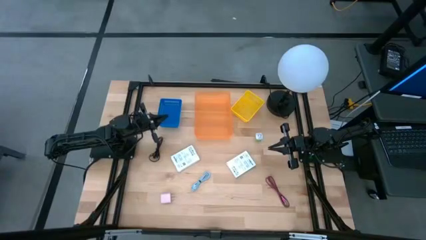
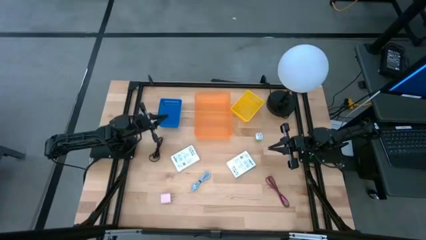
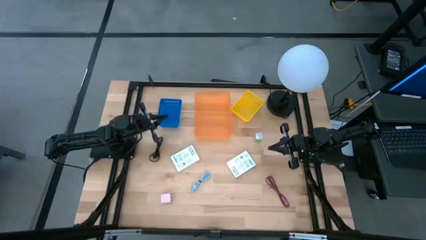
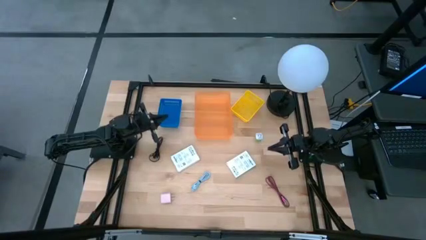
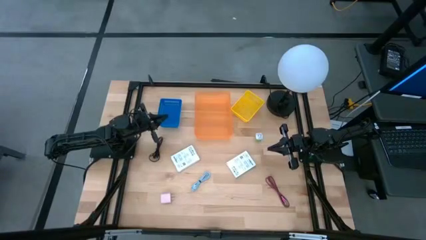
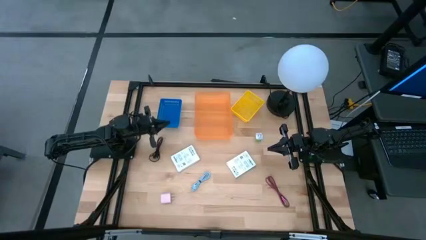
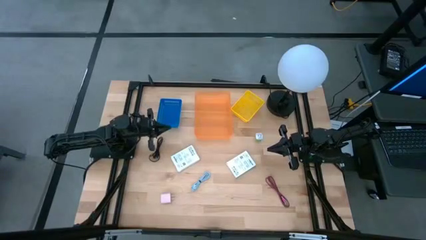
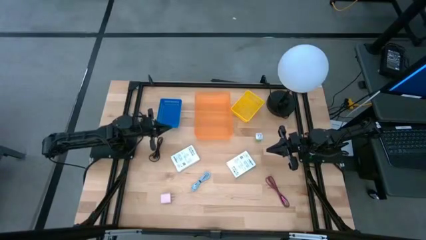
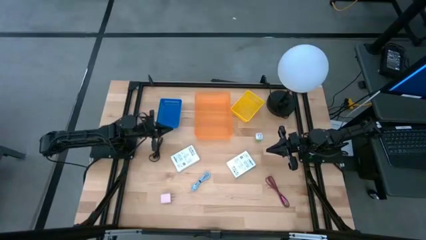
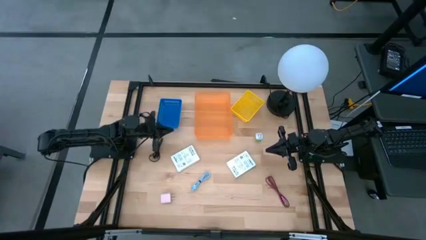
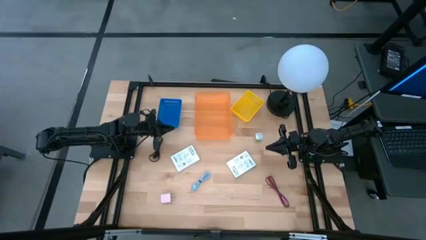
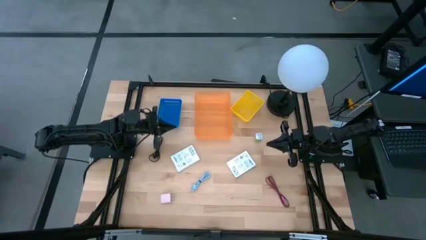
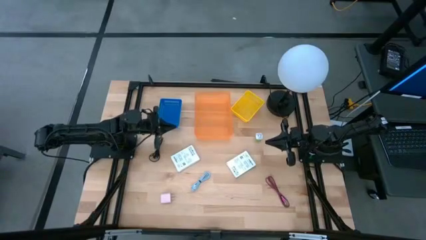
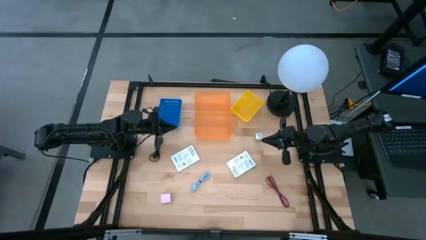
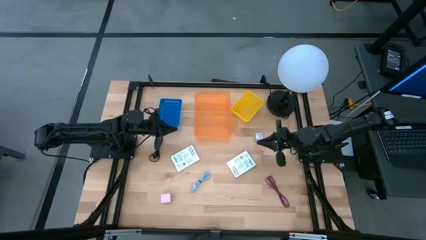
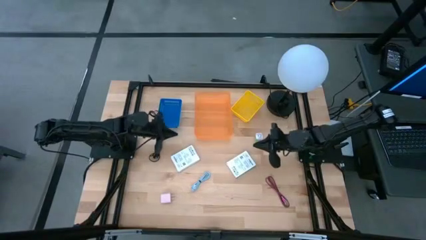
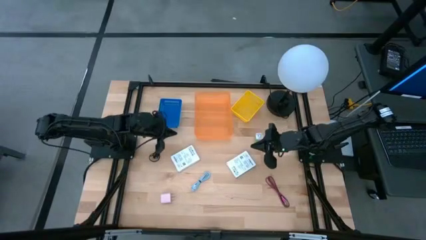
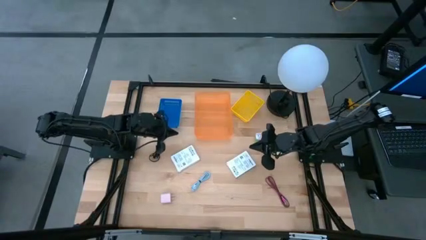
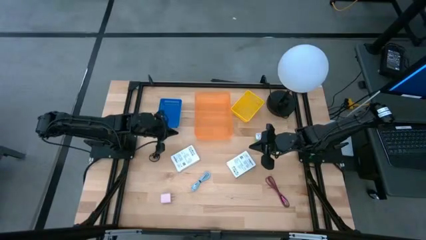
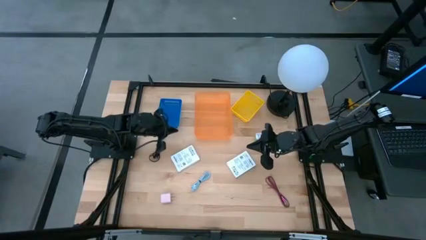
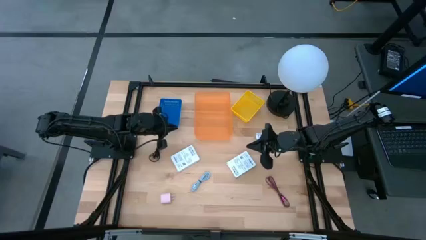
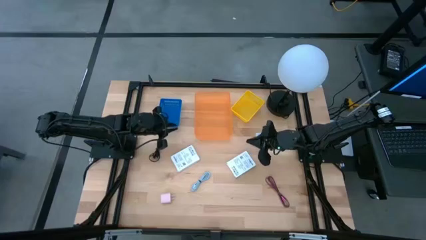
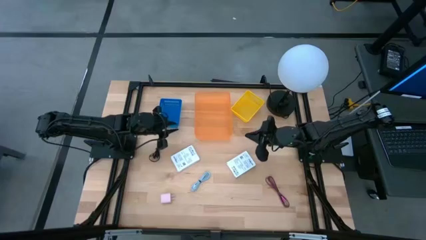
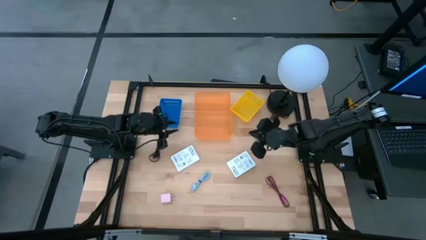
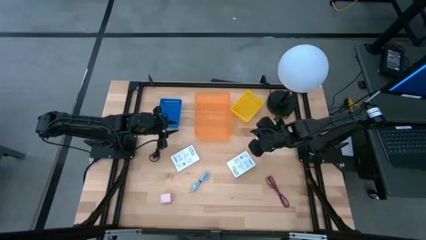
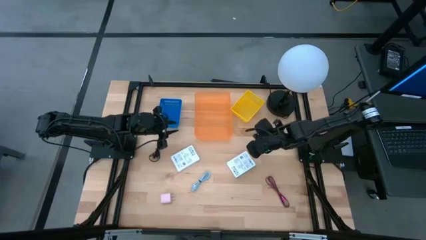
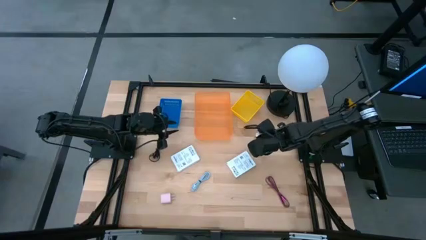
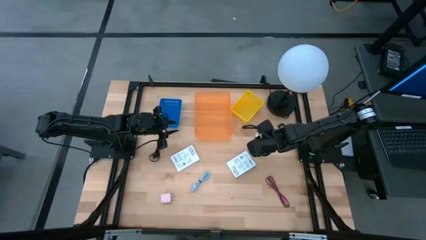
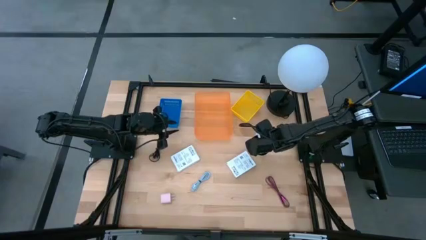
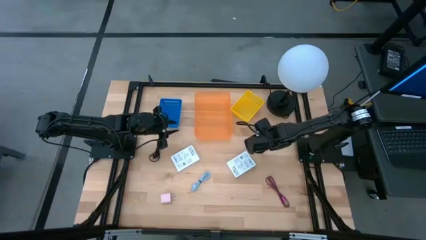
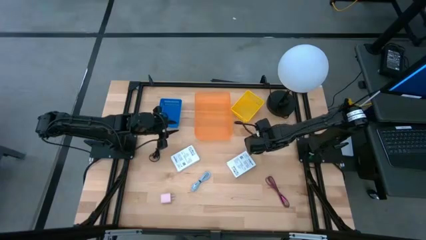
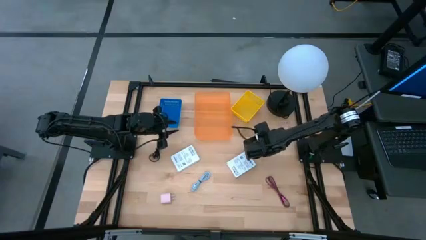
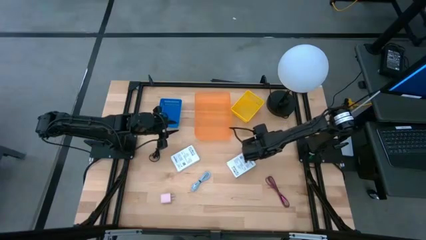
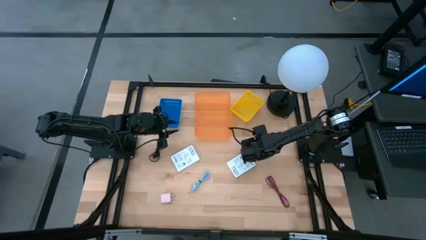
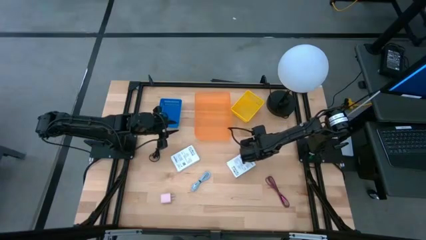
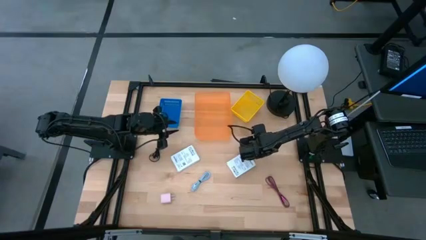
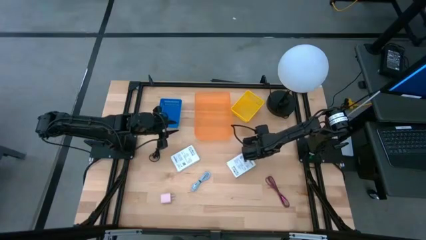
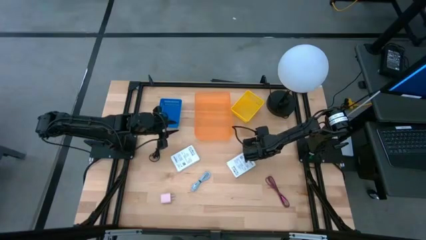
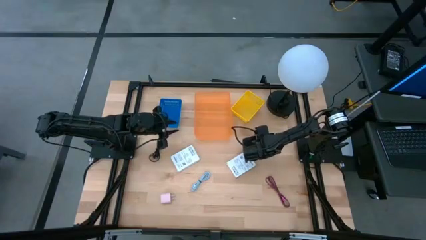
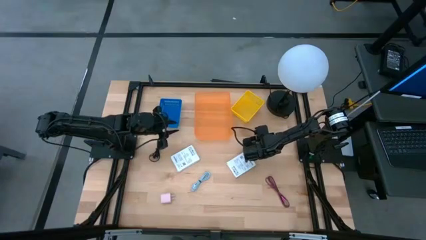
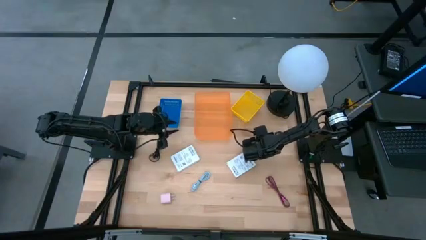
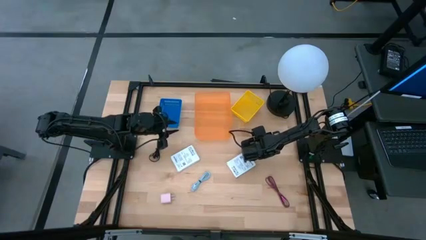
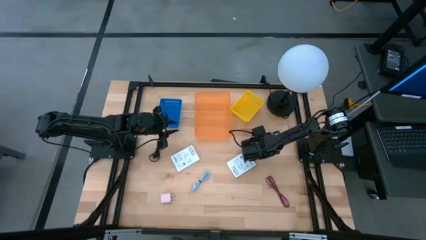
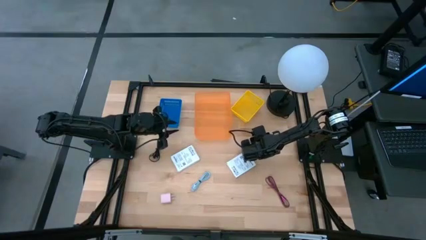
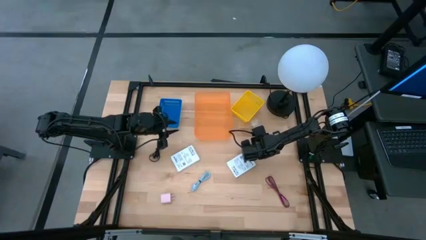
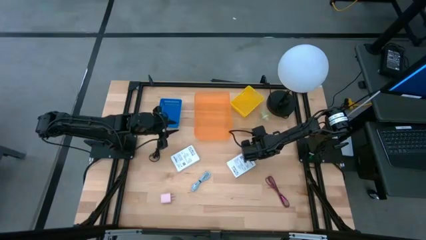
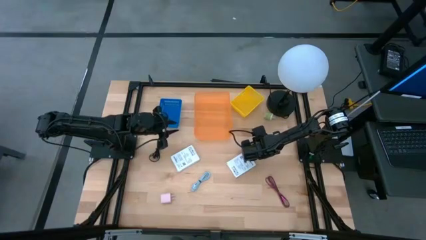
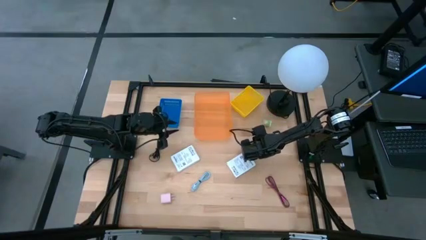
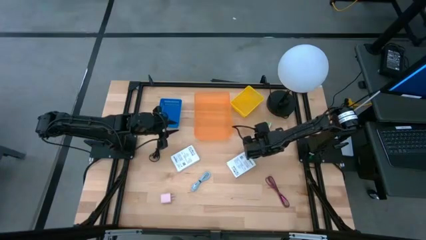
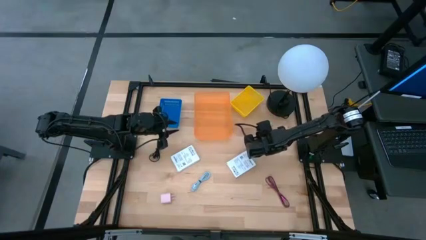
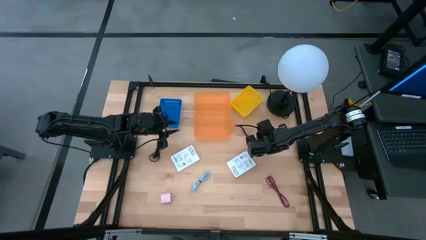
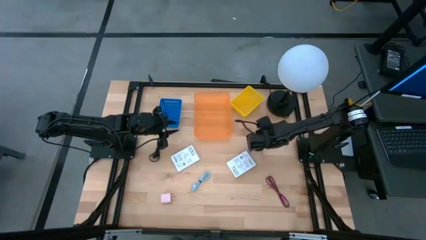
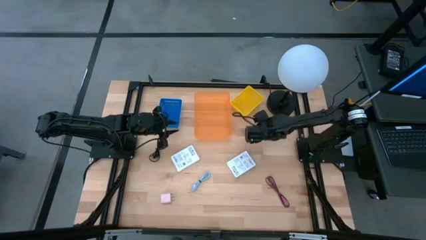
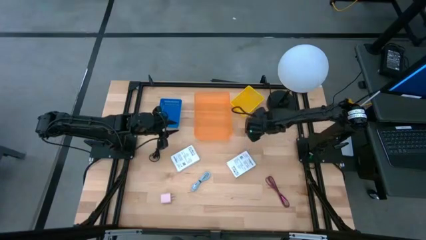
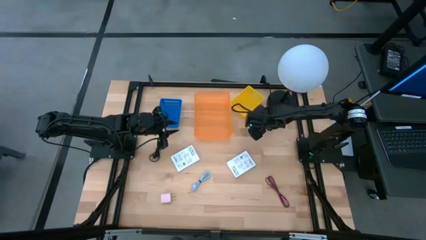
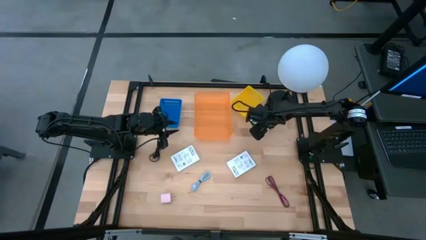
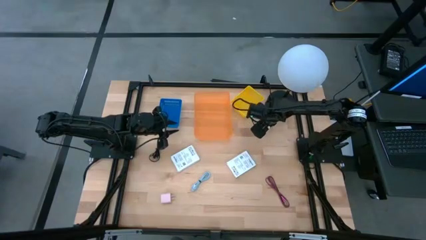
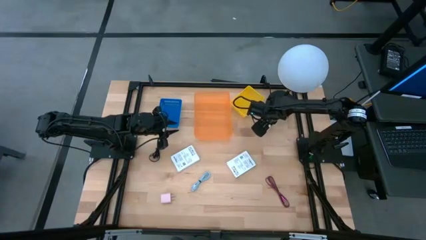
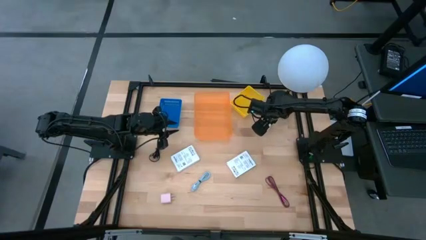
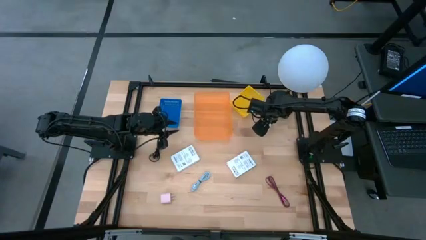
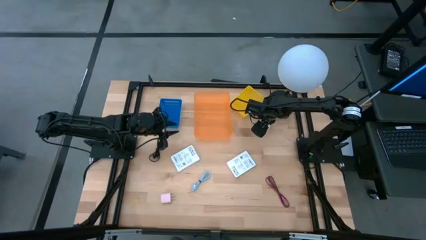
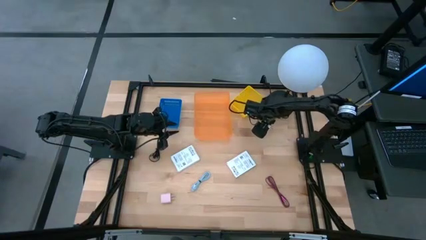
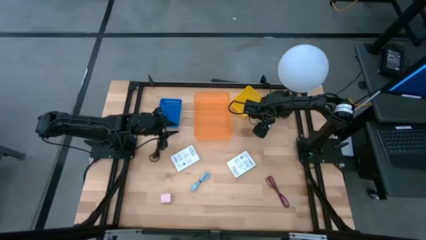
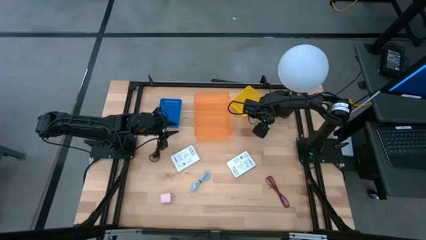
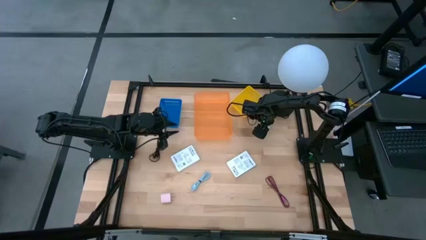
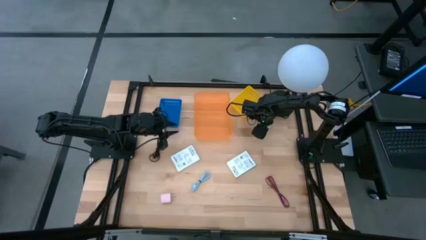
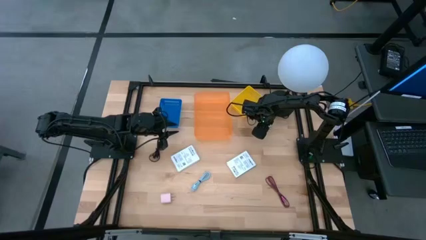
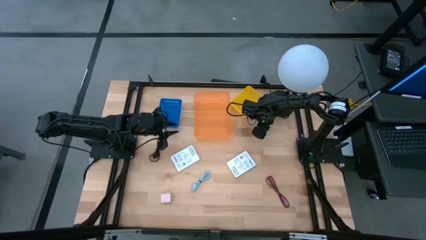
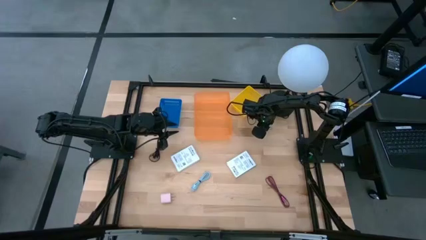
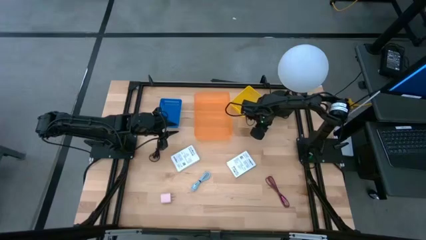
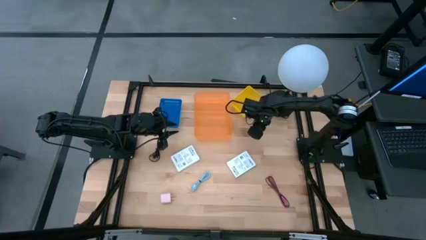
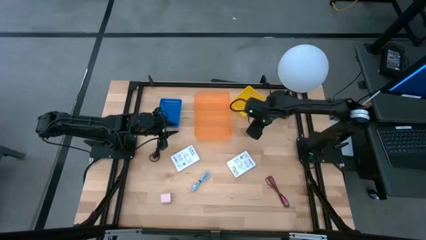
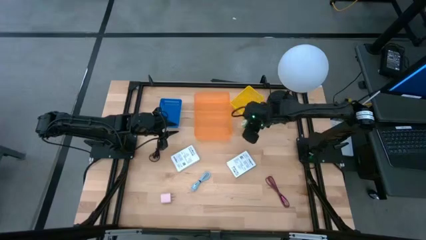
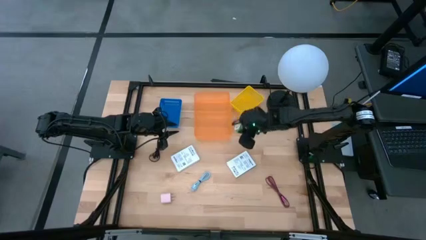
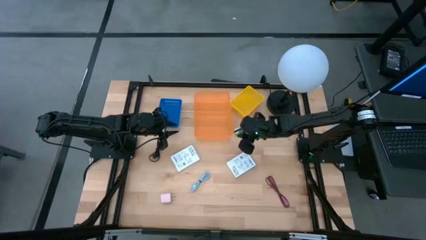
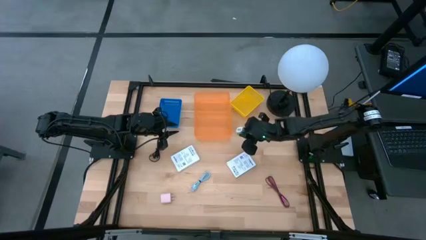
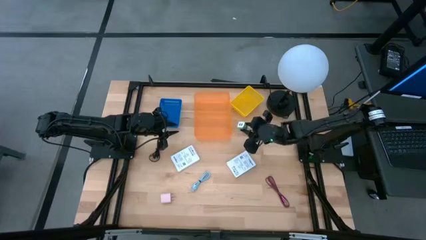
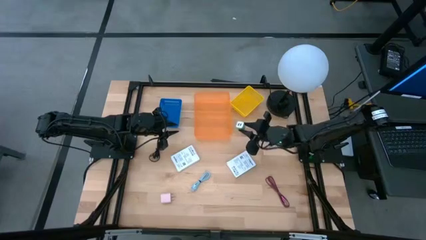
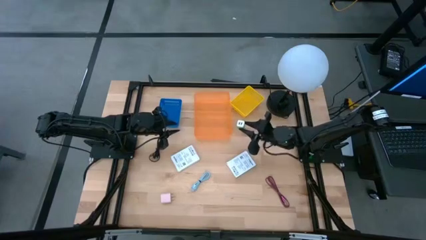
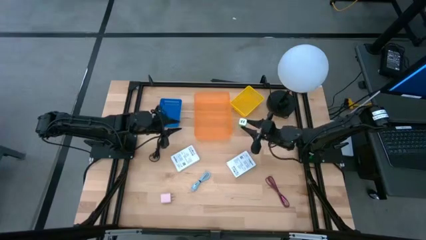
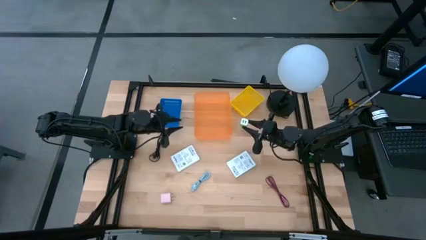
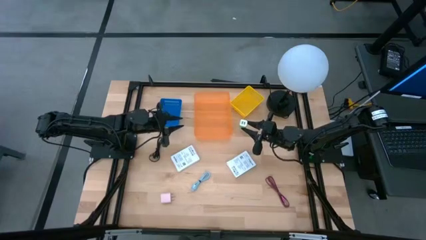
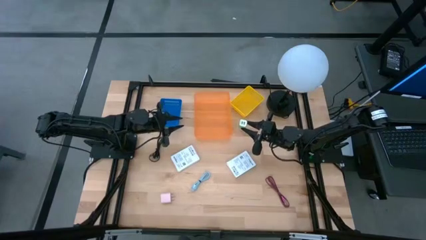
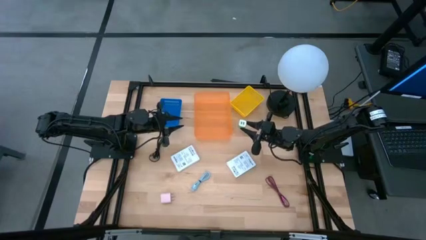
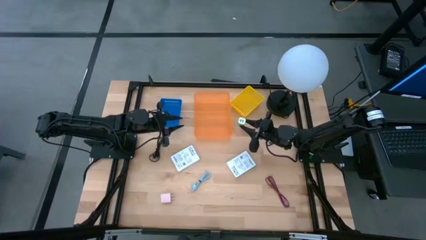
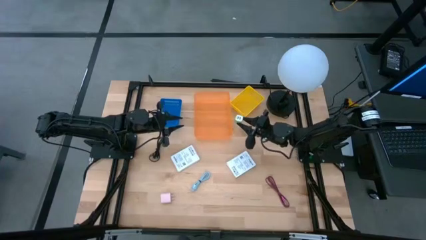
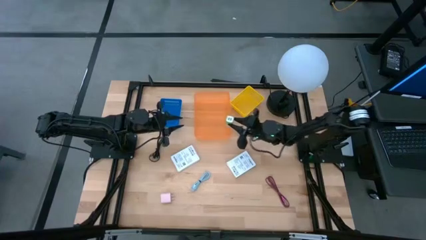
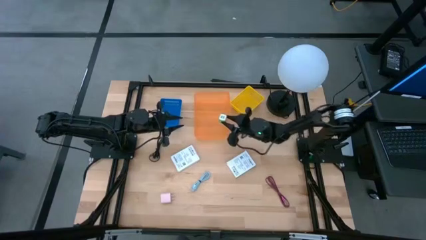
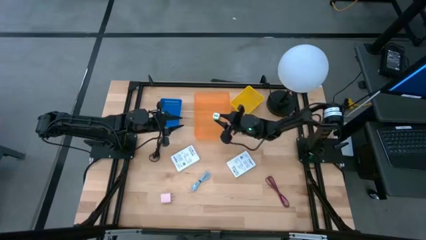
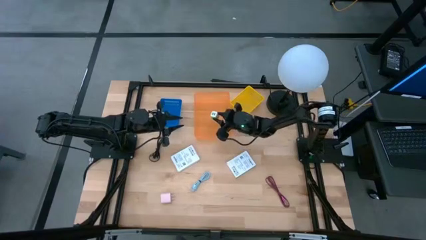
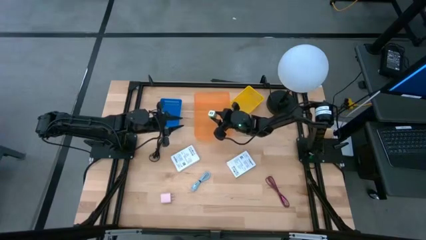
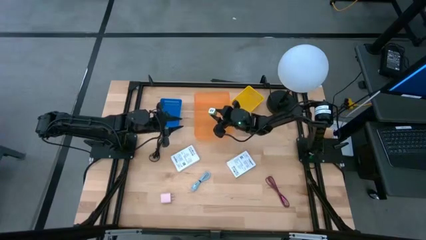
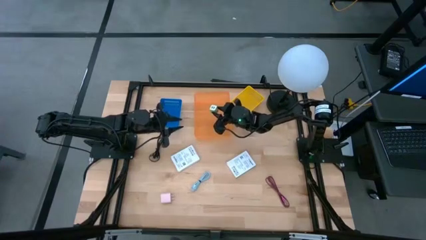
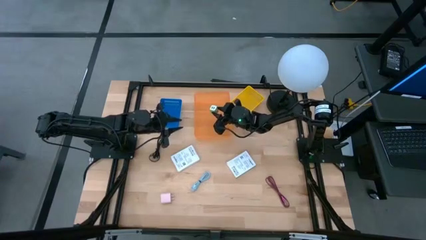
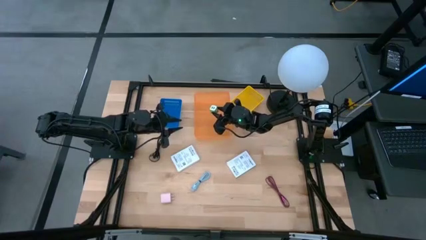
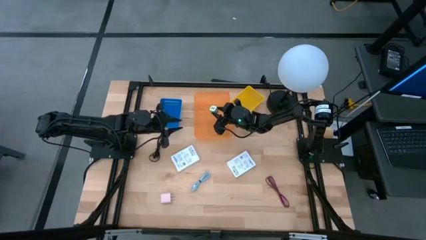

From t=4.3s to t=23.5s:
Task: Pick and place items into bin
Put the green adaptor into the orange bin
